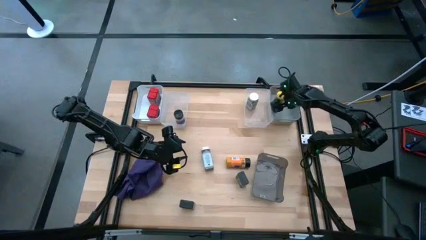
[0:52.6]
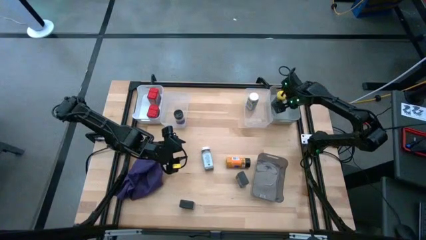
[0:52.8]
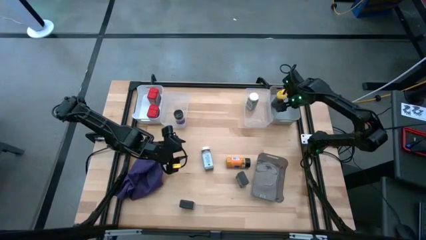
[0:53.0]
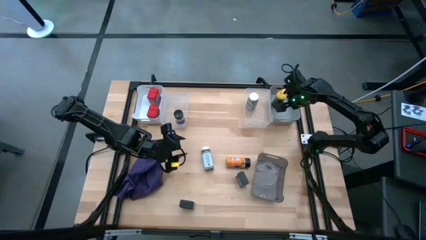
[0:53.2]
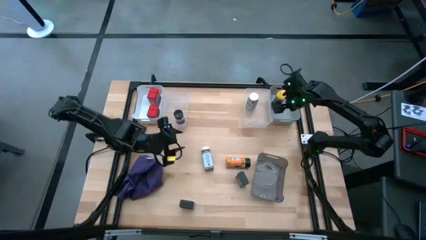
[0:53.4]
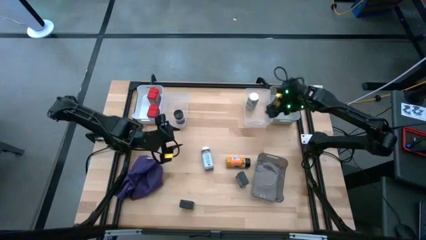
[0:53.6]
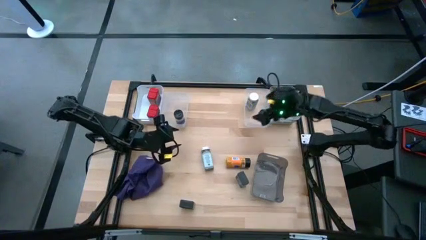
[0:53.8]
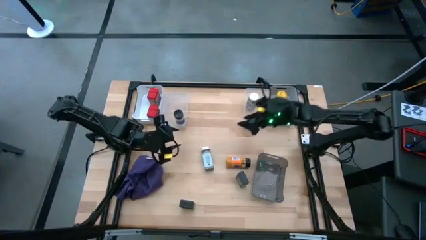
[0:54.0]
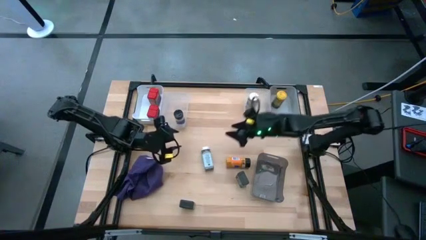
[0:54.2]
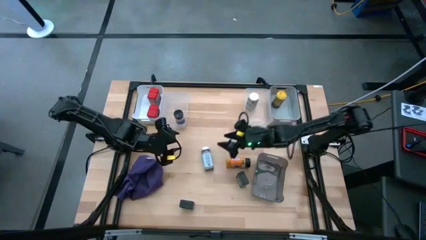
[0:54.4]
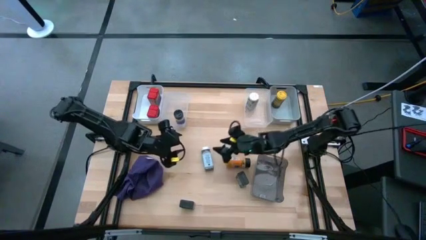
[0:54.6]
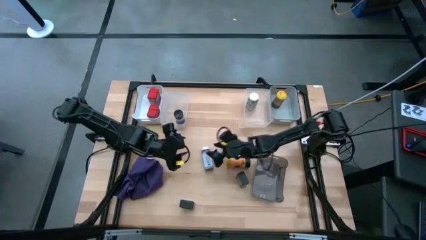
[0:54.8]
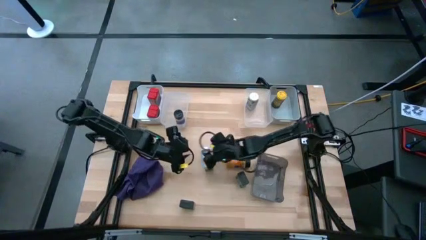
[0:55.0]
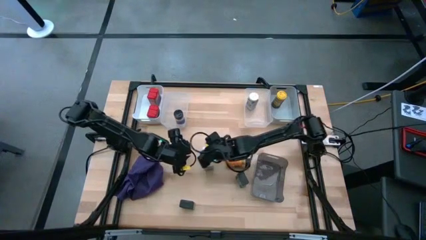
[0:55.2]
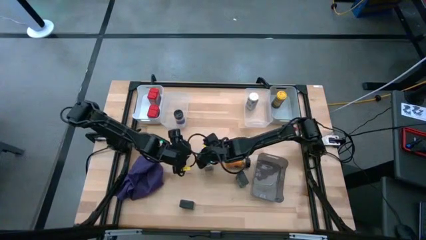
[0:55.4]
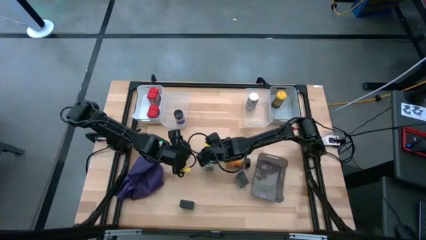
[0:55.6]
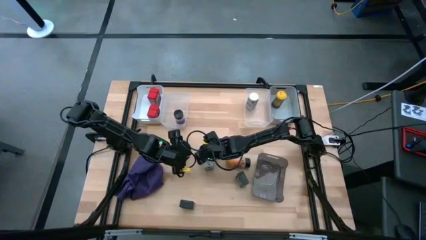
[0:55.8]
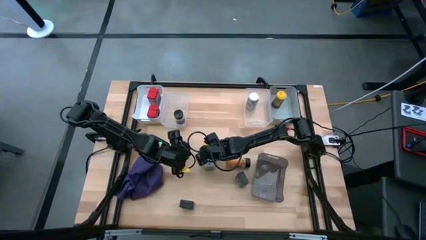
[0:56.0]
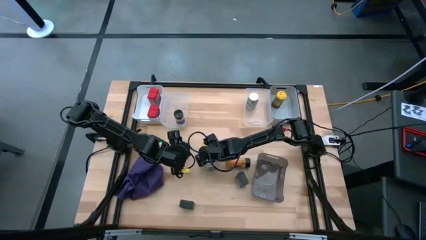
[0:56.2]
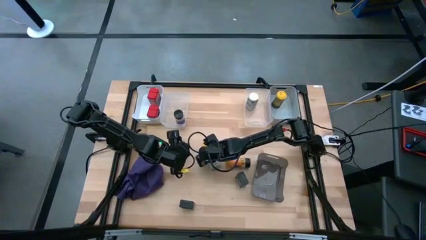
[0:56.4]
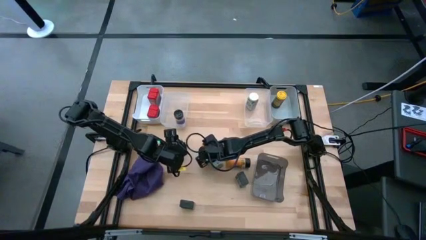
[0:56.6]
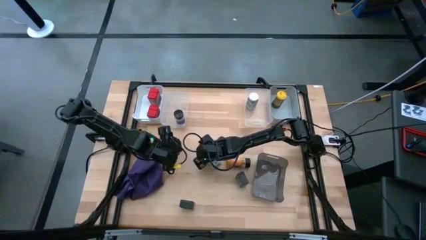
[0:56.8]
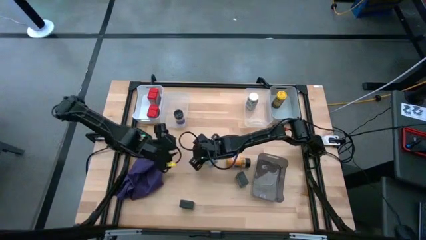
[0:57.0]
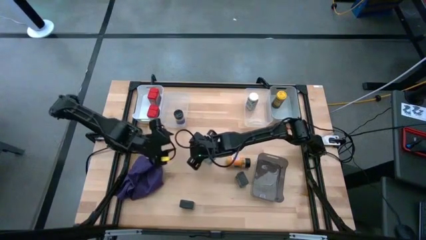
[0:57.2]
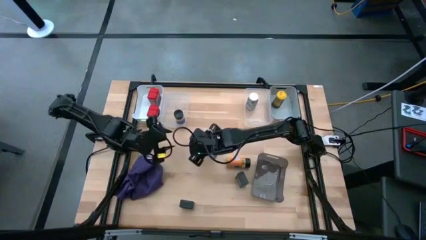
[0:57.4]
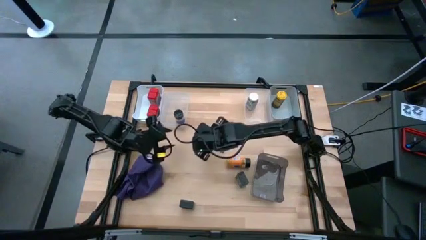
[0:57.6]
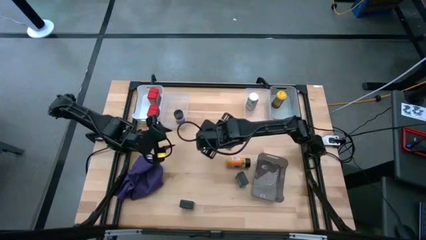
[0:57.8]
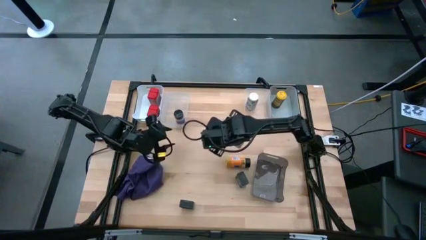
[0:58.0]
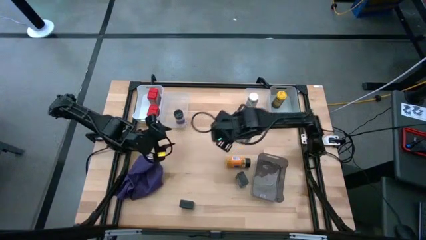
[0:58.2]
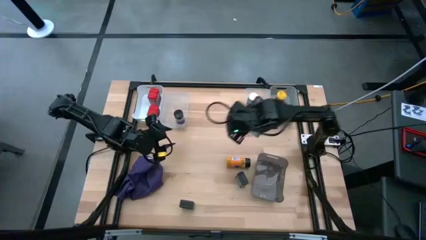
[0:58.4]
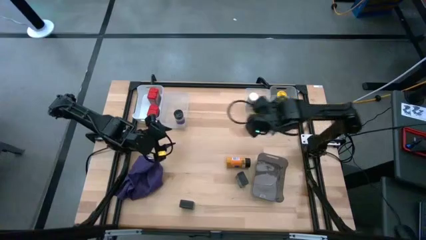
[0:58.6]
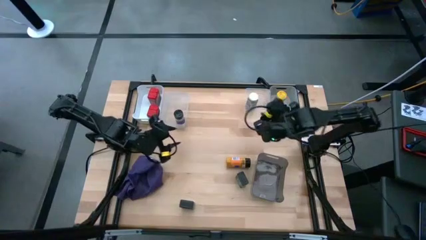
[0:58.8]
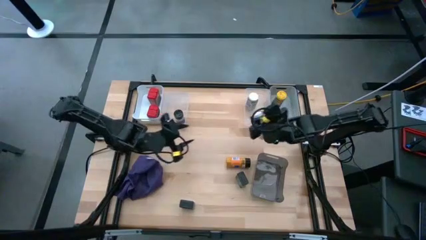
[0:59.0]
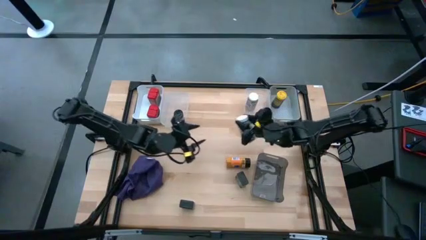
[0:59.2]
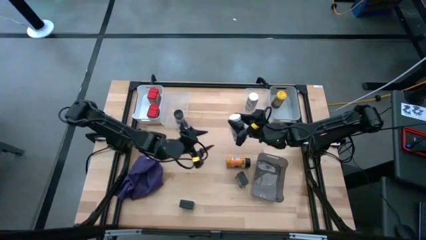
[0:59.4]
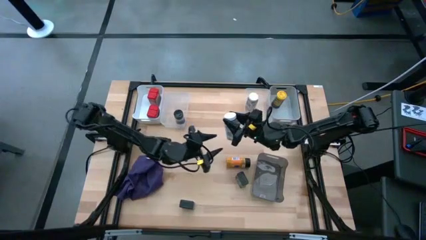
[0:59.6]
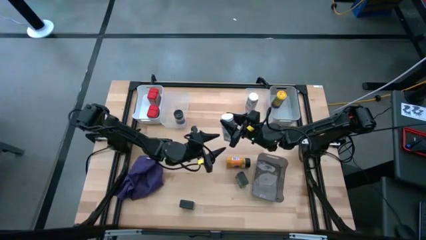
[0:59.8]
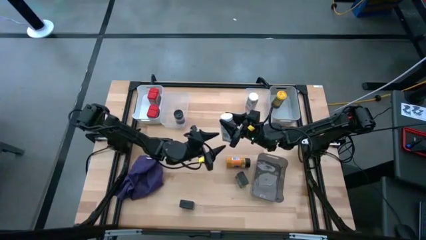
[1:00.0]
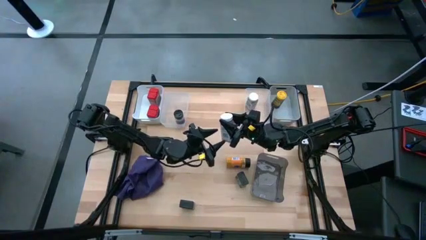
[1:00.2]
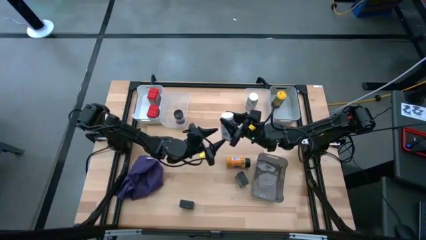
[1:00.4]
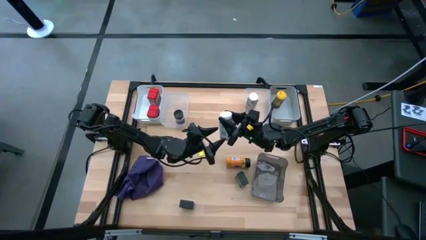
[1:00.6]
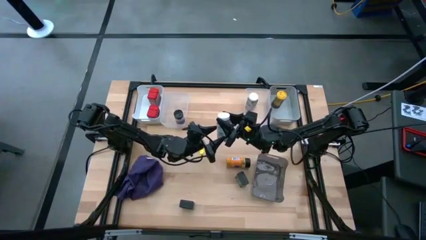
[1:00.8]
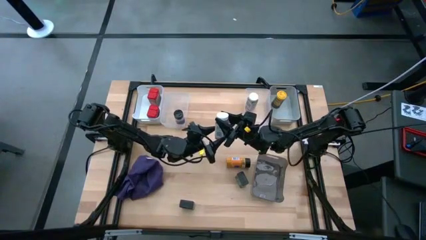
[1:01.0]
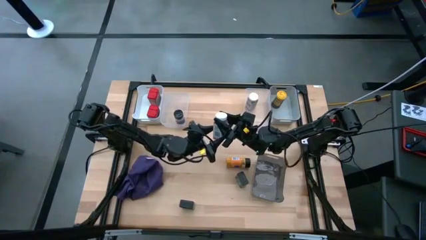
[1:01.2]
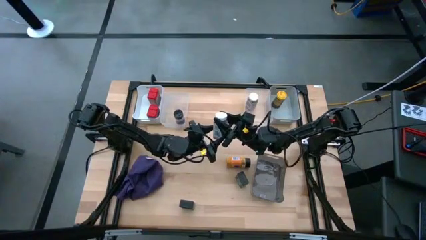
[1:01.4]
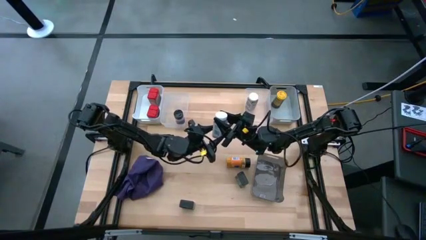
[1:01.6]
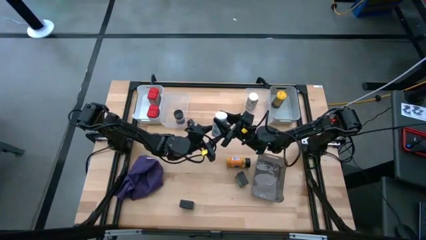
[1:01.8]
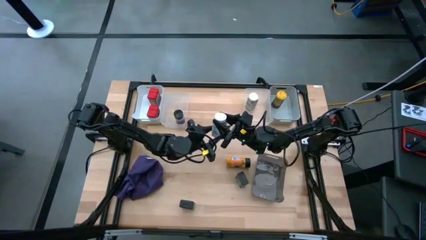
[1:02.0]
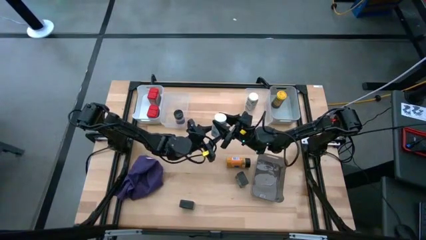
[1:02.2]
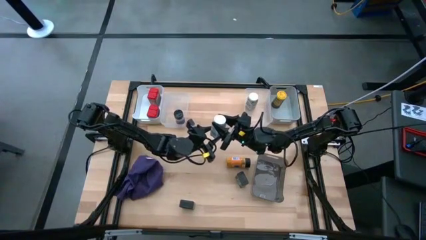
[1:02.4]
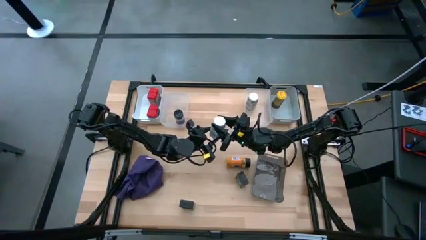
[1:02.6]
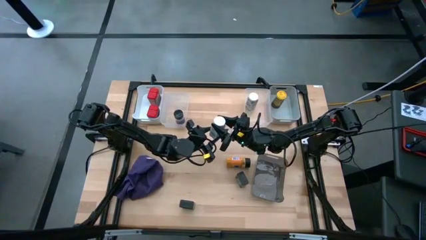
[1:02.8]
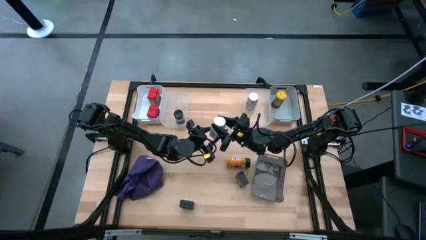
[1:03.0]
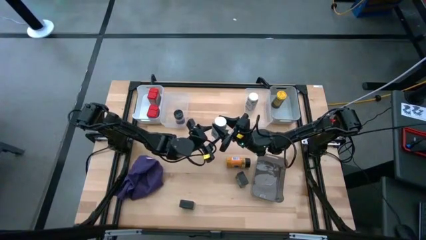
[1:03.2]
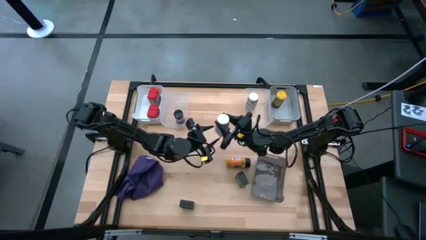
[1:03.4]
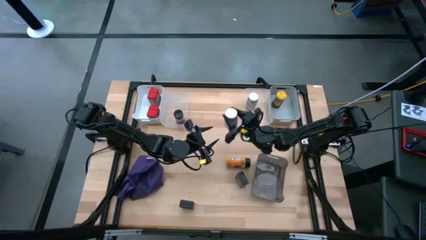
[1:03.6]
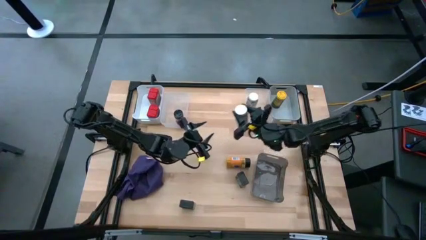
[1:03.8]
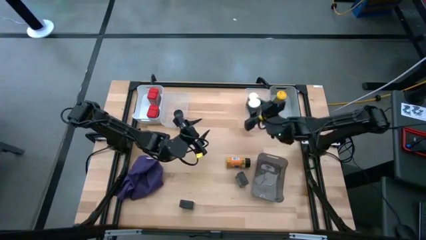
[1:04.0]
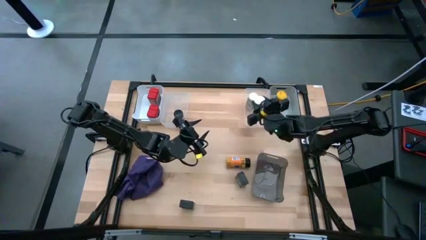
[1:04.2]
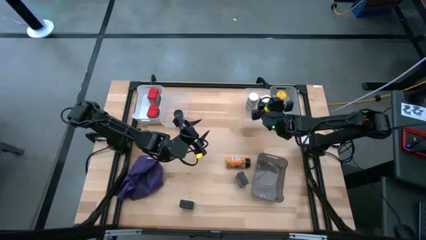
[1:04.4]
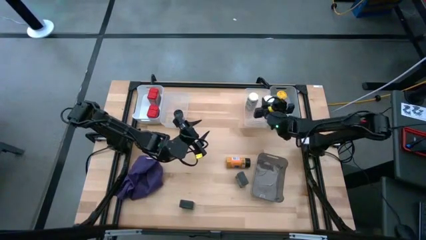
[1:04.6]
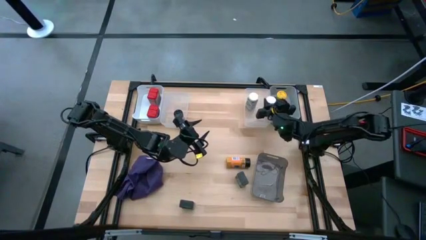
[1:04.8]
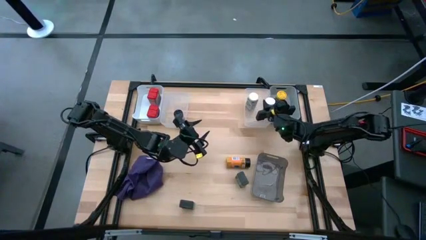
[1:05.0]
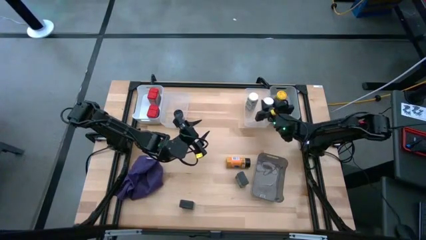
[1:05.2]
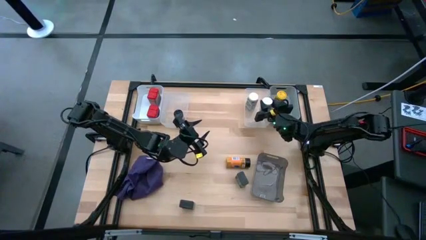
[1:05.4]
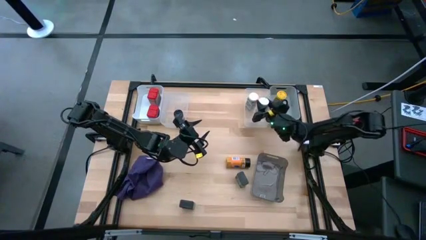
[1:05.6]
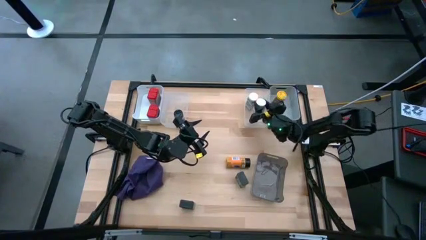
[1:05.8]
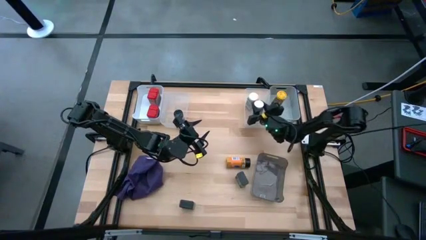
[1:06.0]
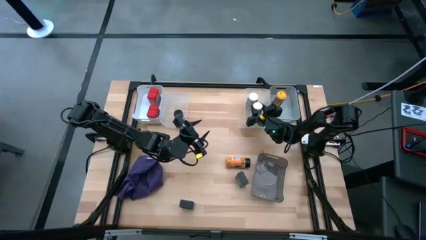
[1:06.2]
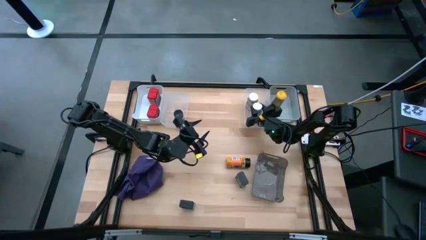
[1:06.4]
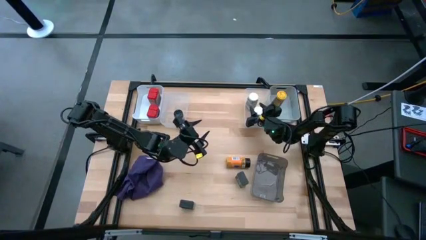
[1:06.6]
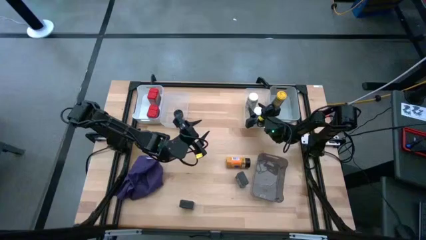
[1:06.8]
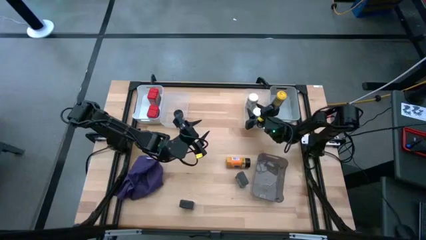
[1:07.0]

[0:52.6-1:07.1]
Task: Sort spices by type
Put the white seasoning bottle into the right transparent bin

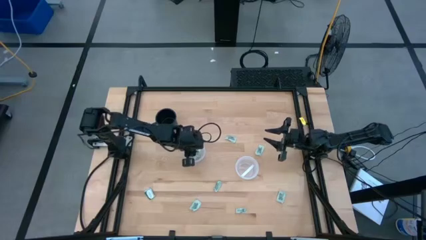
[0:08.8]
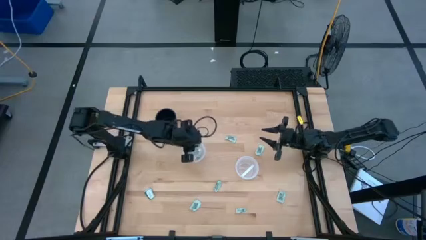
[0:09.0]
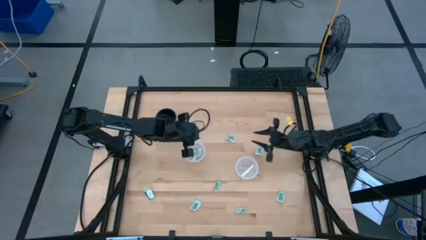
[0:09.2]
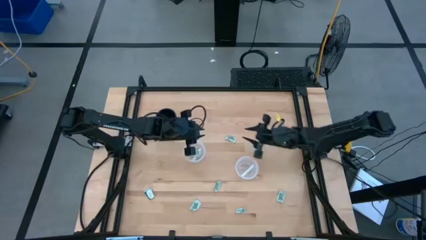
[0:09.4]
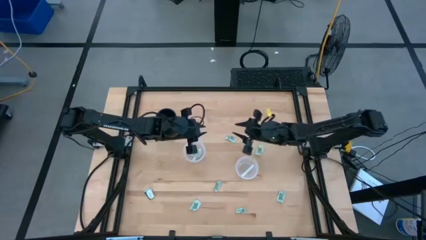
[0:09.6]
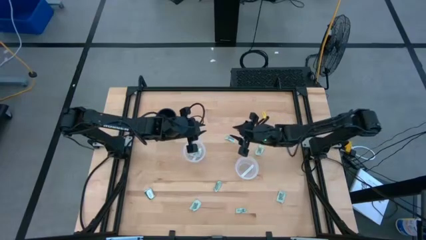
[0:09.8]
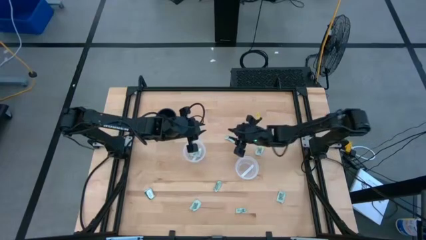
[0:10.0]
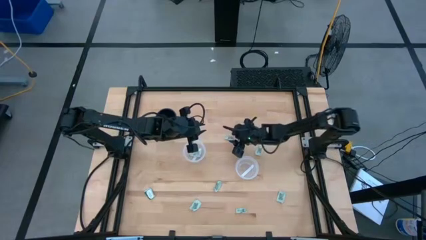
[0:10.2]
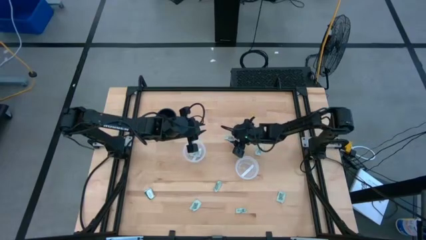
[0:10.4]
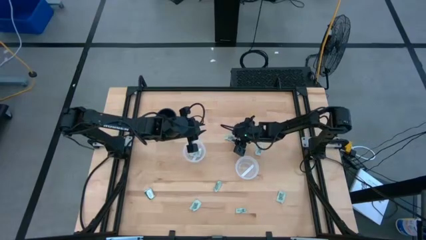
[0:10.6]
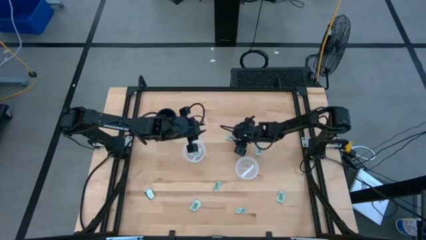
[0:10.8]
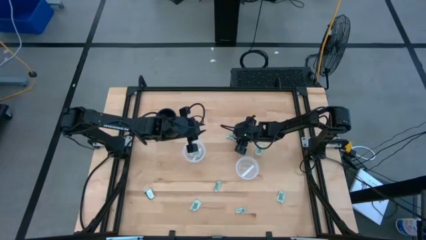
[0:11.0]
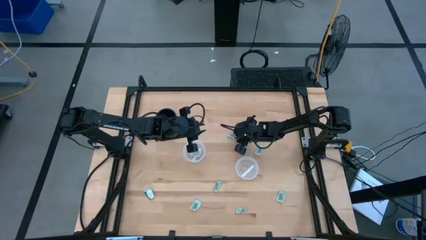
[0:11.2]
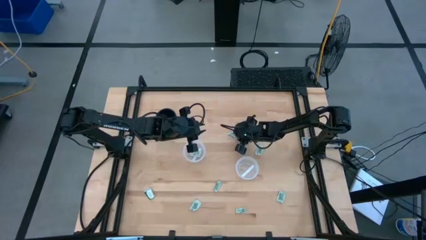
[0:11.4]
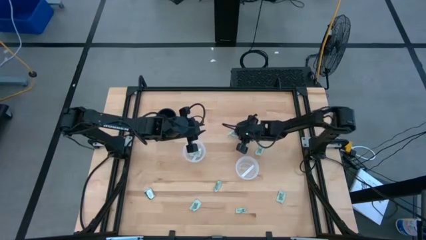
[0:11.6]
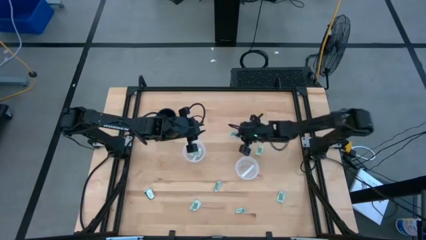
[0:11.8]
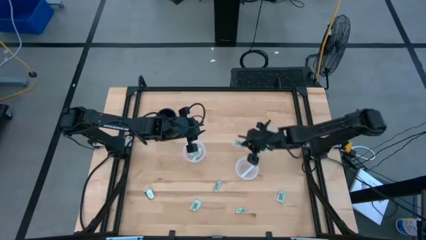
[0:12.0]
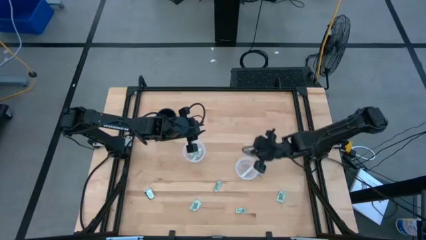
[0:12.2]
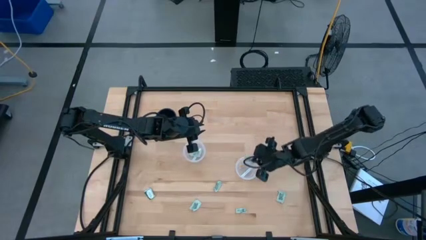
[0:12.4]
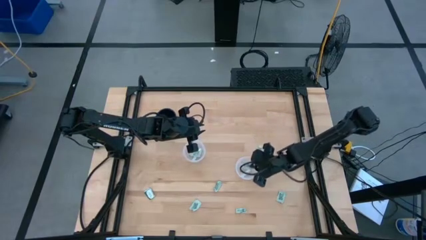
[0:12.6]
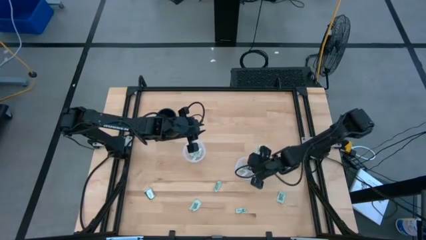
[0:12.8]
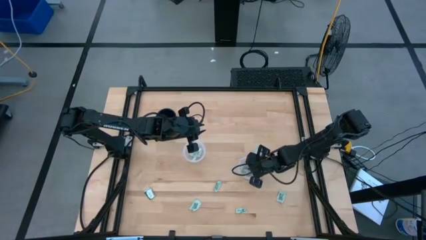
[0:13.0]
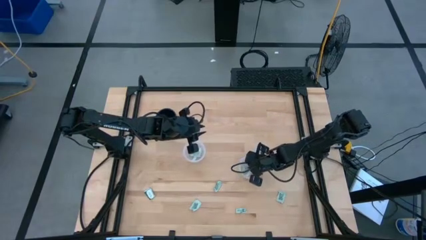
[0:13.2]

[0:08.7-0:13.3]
Task: Pick and place Stevia / Truvia into bins
Put the green stevia packet into the right transparent container
